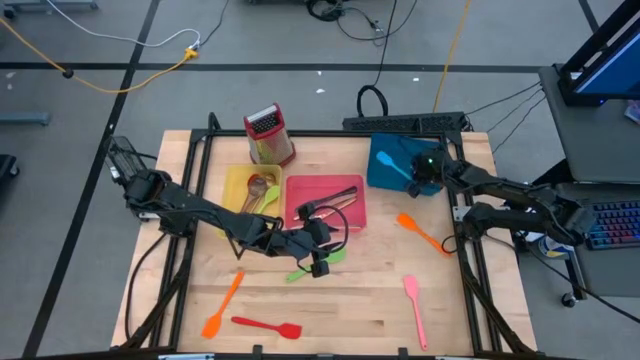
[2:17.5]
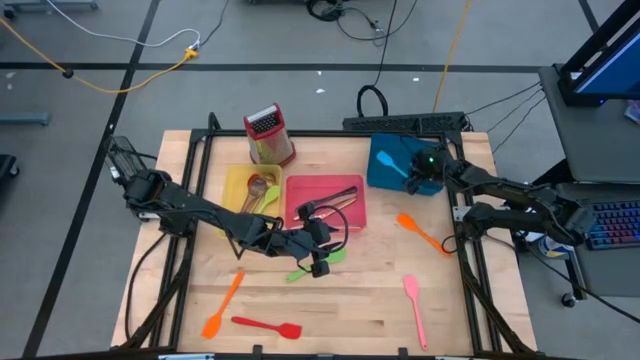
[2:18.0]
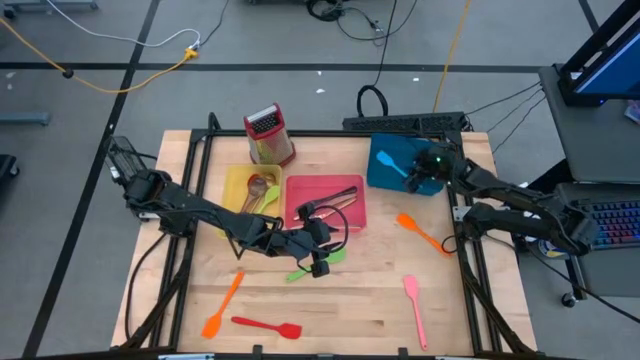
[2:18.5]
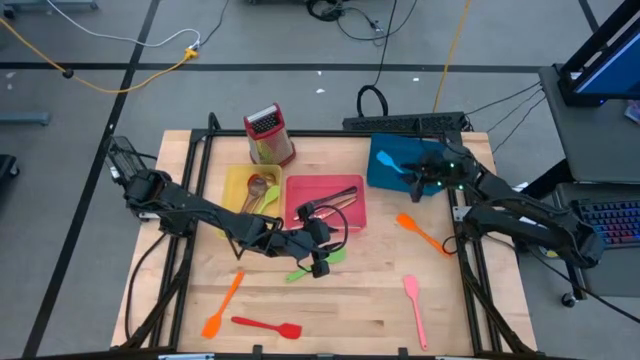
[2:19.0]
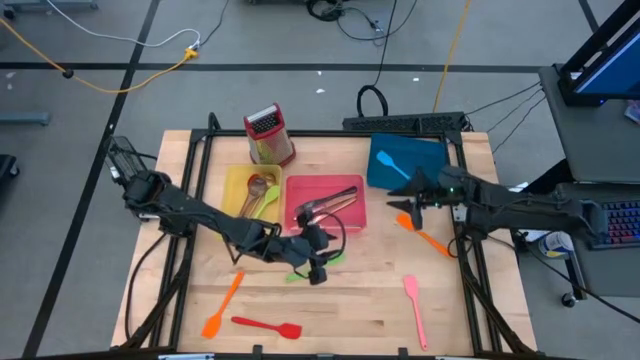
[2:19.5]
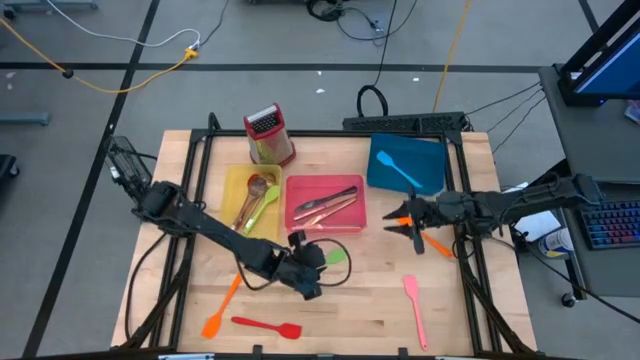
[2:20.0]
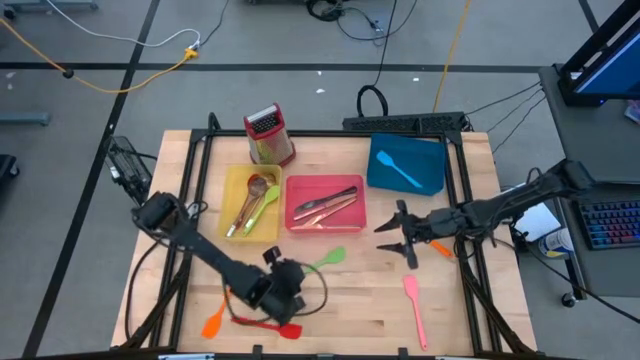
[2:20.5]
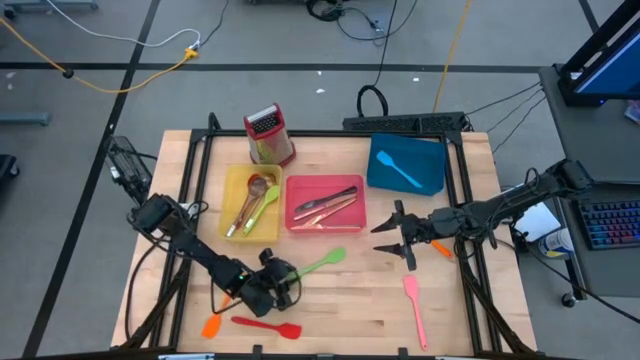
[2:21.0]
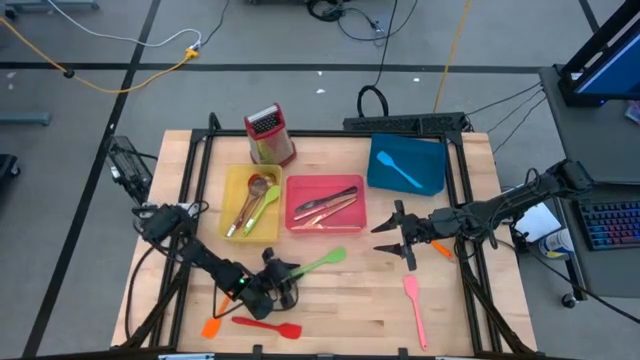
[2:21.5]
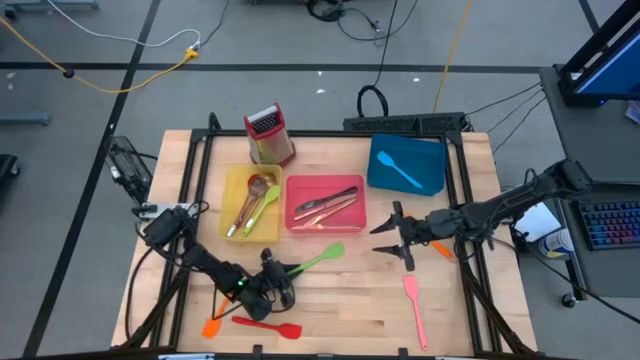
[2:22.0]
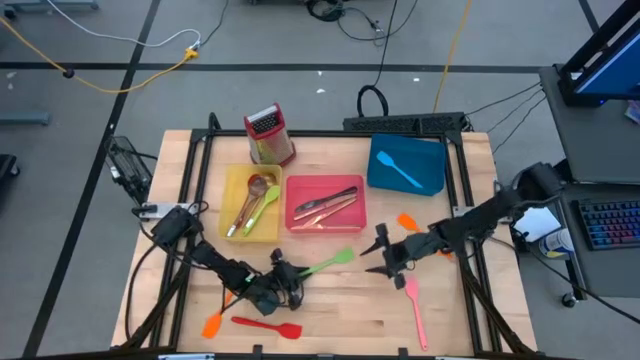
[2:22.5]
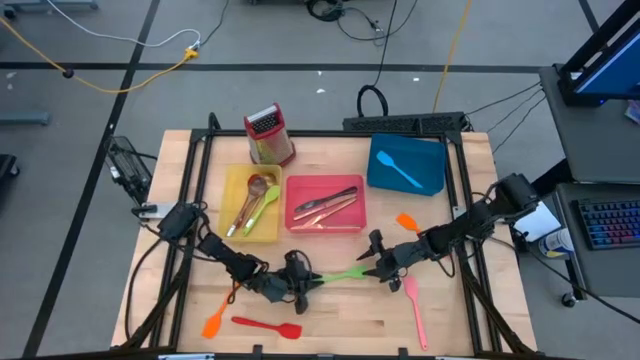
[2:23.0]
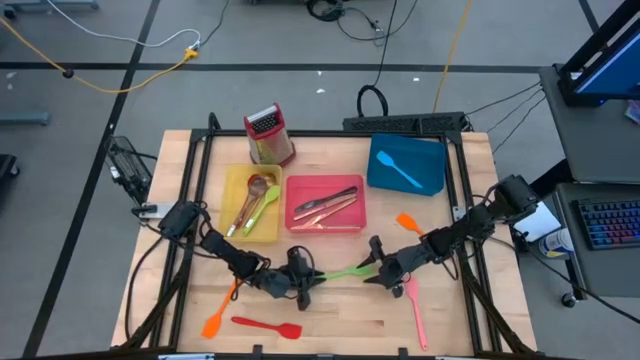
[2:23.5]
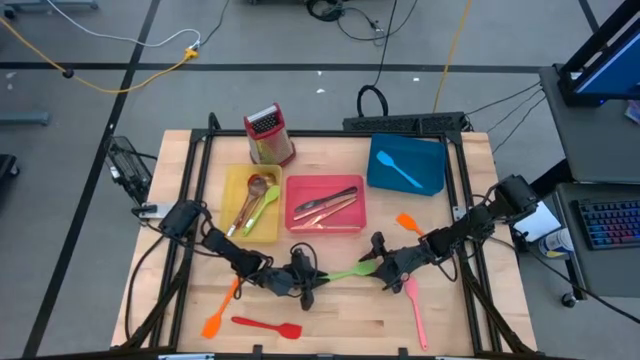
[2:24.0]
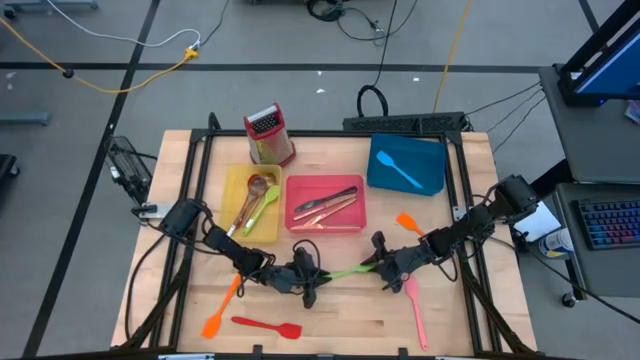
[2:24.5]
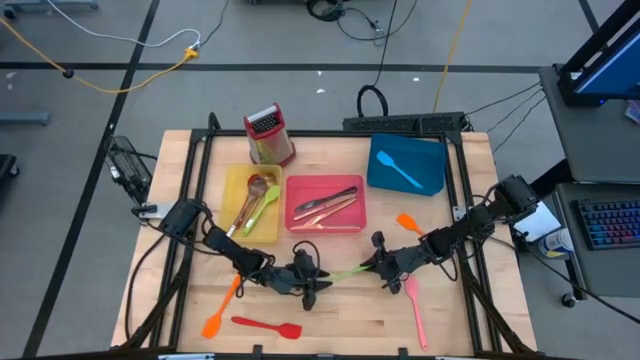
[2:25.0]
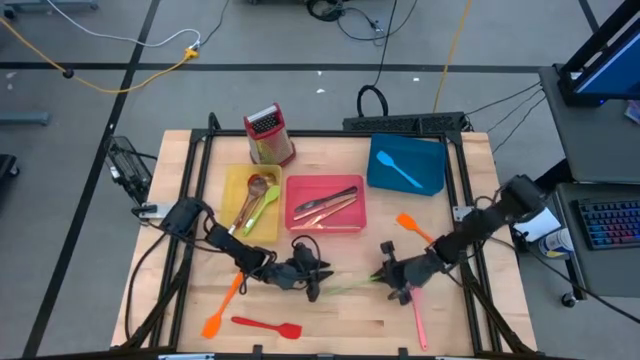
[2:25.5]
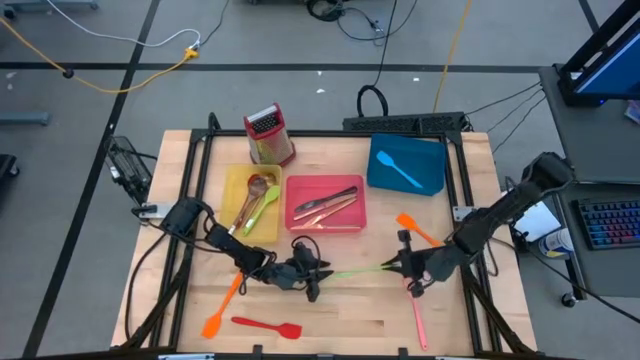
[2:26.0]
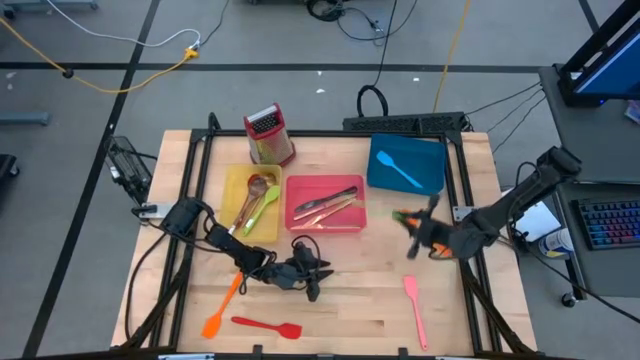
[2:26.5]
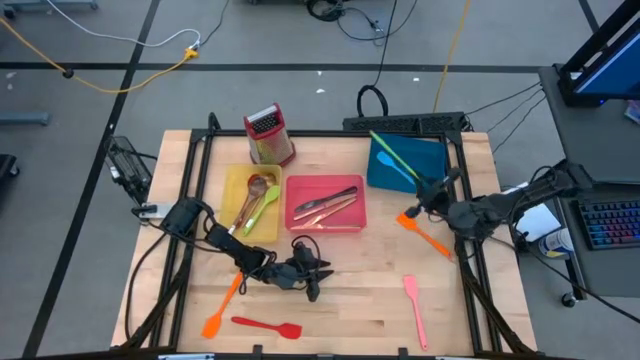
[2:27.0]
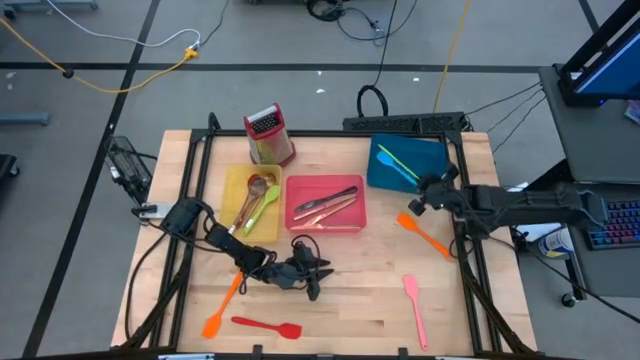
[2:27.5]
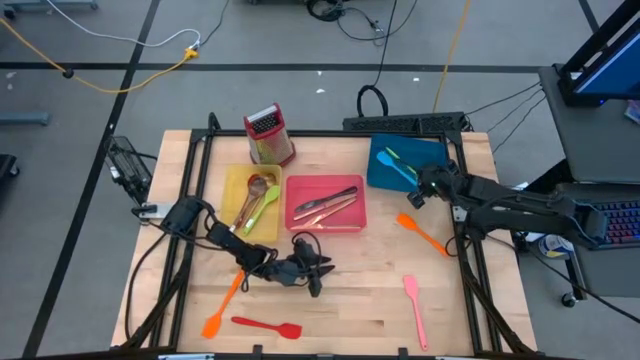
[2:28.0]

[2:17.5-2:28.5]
Task: Pick & Place Kitchen Items
Put the green spatula into the blue bin

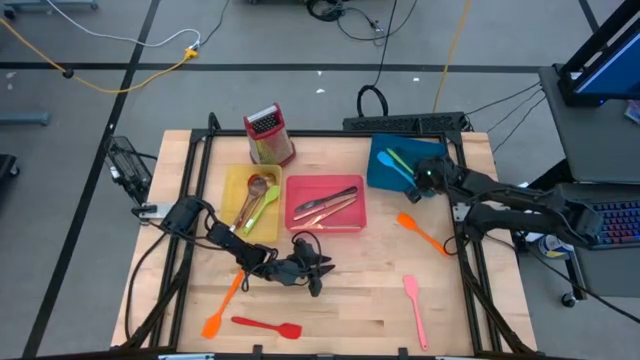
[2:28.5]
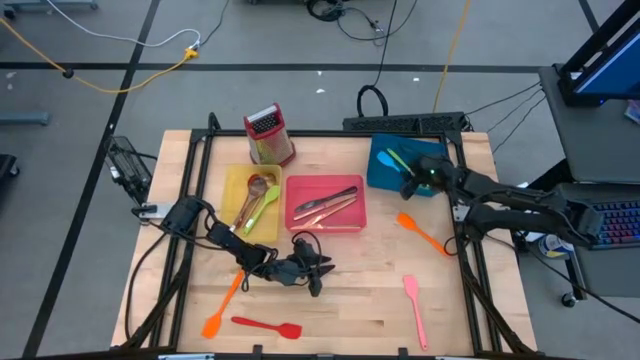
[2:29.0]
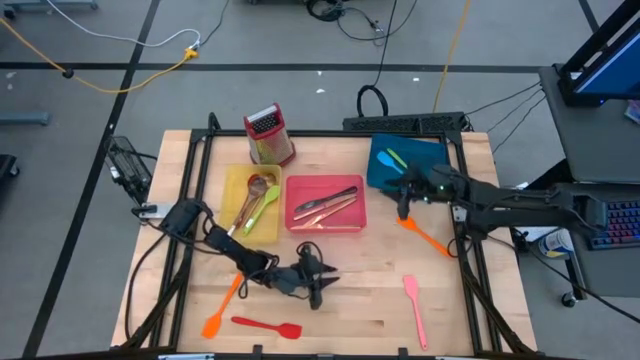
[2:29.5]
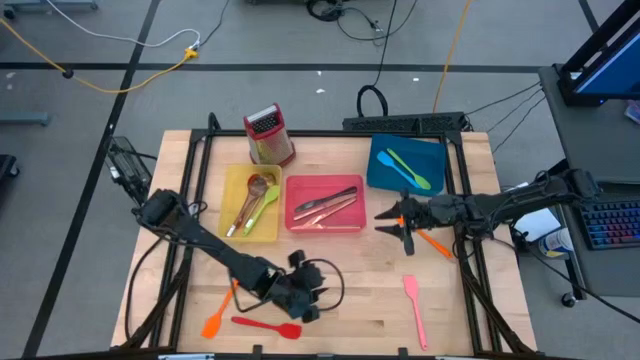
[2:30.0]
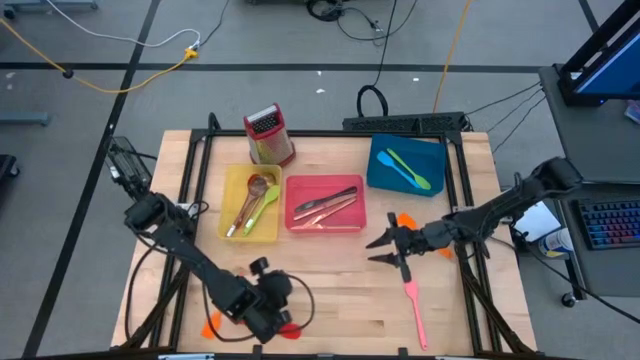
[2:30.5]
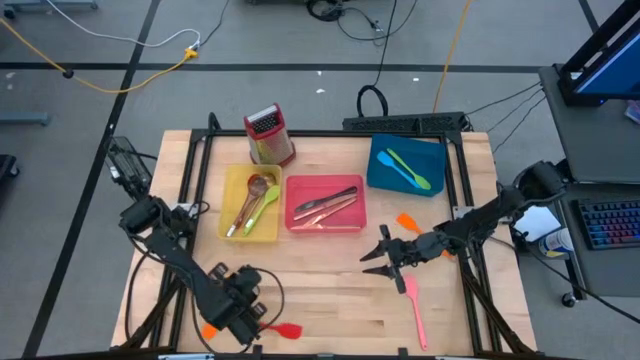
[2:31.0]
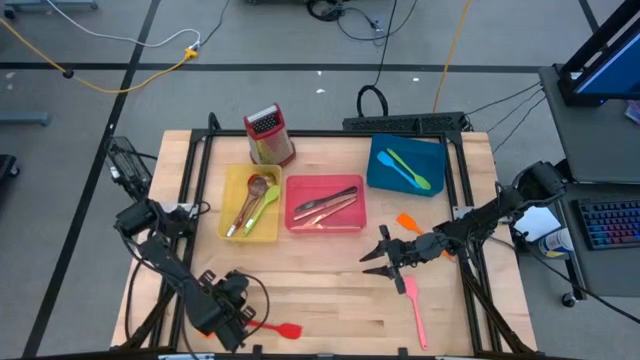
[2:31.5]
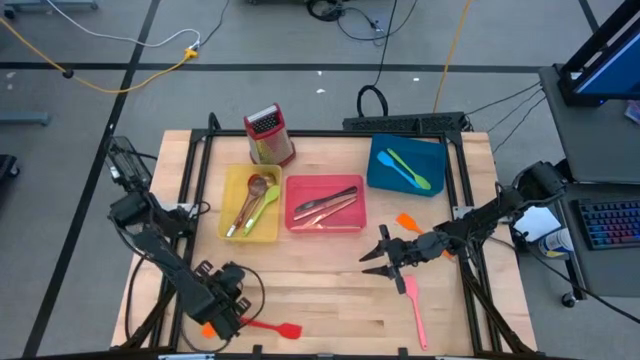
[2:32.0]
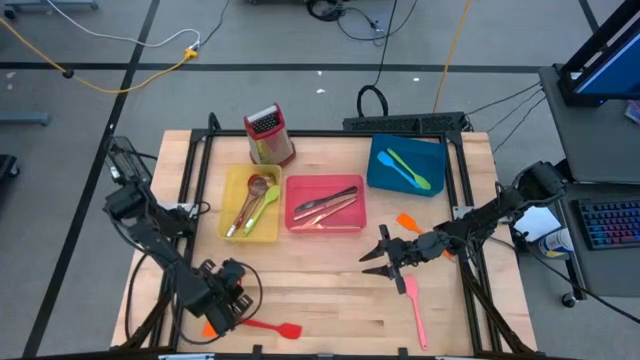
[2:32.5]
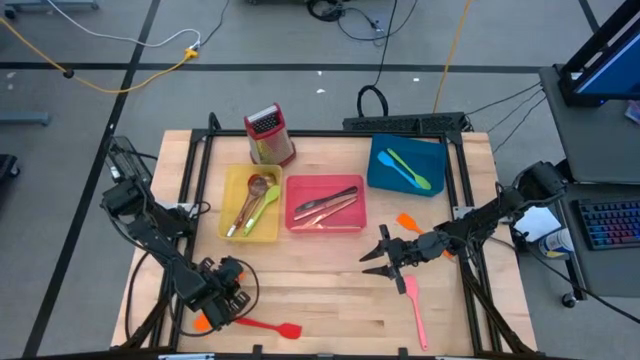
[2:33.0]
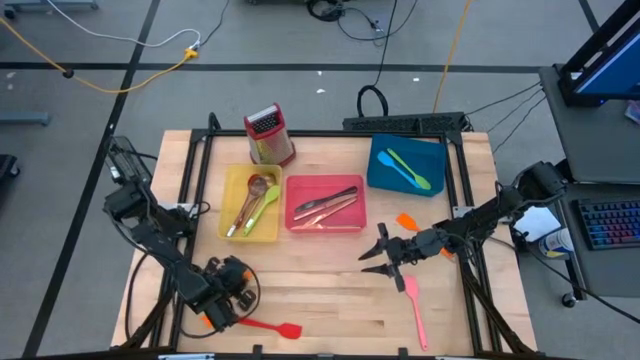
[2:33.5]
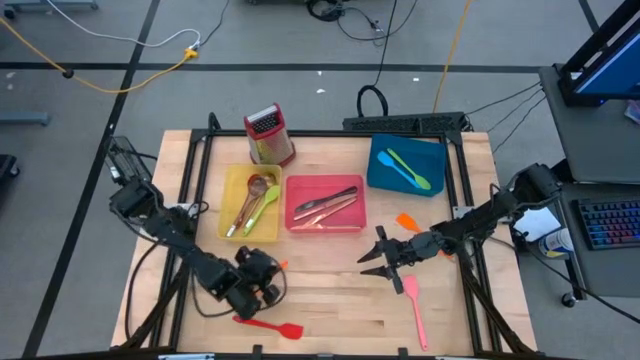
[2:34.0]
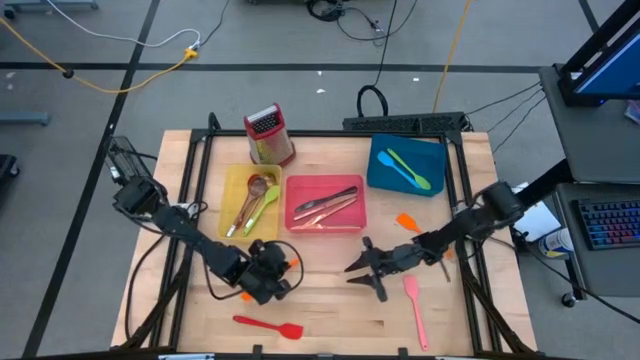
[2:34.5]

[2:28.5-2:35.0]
Put the bottom orange spatula into the blue bin

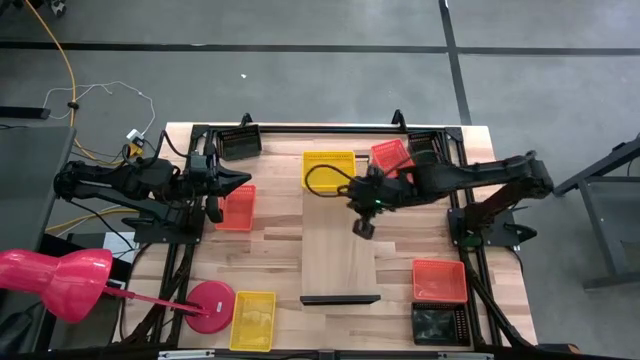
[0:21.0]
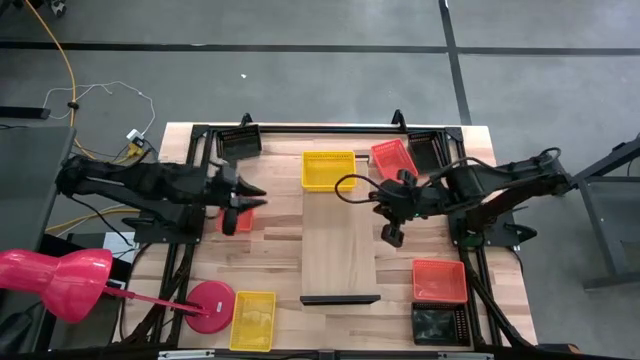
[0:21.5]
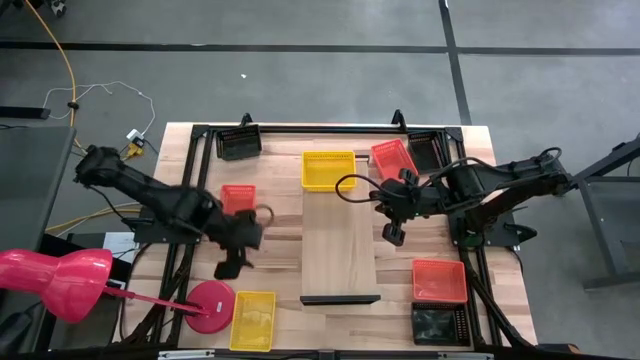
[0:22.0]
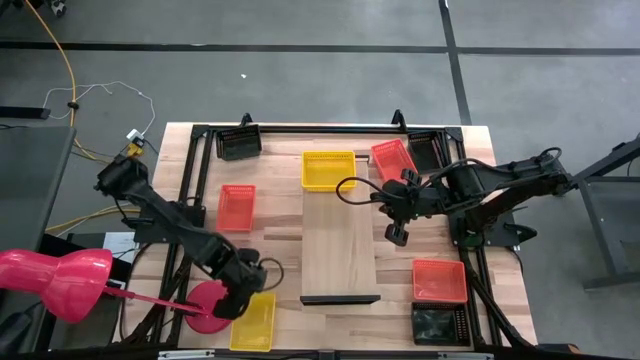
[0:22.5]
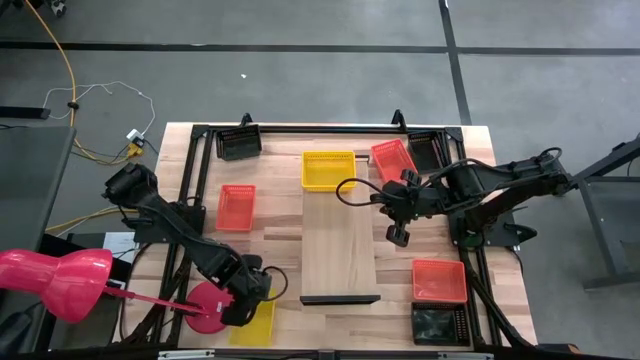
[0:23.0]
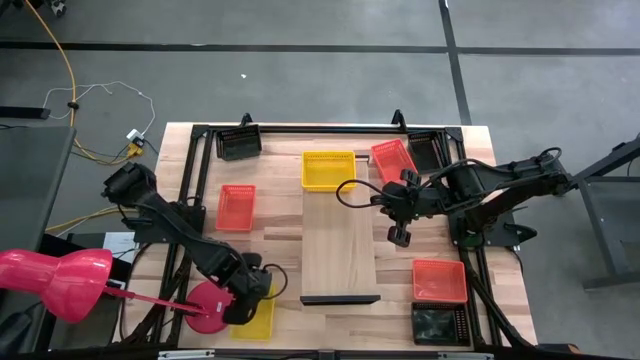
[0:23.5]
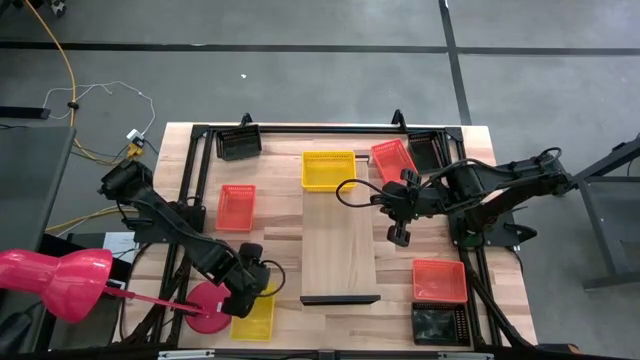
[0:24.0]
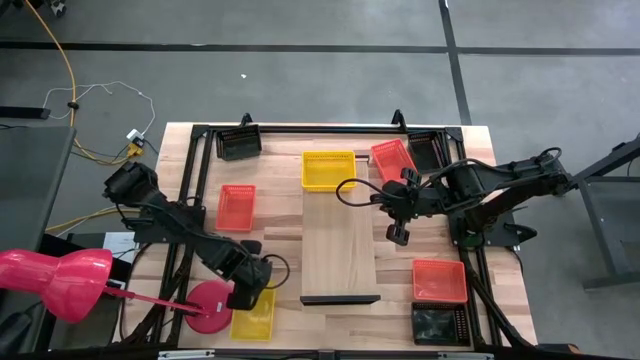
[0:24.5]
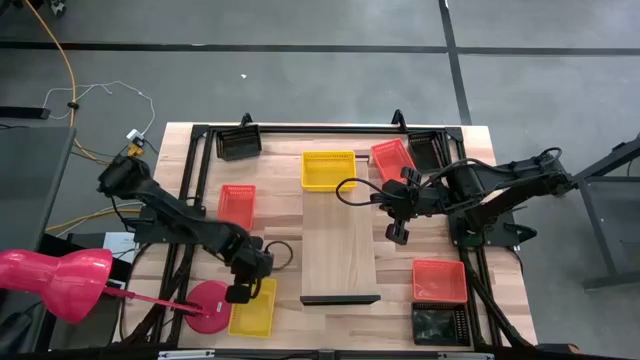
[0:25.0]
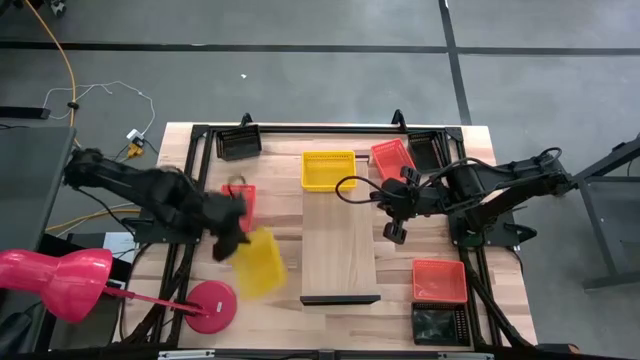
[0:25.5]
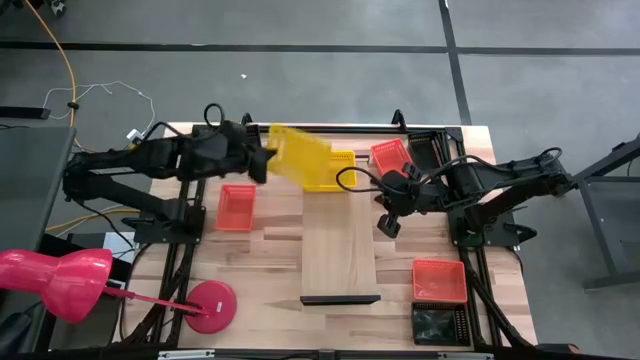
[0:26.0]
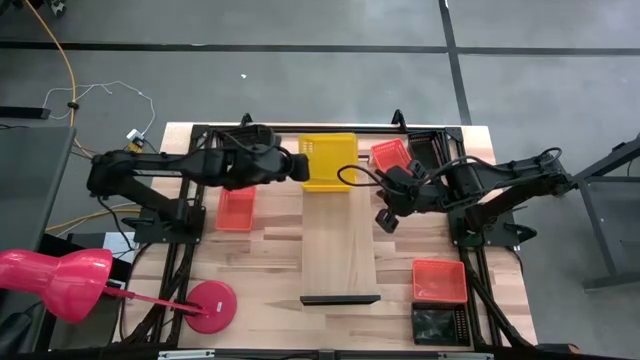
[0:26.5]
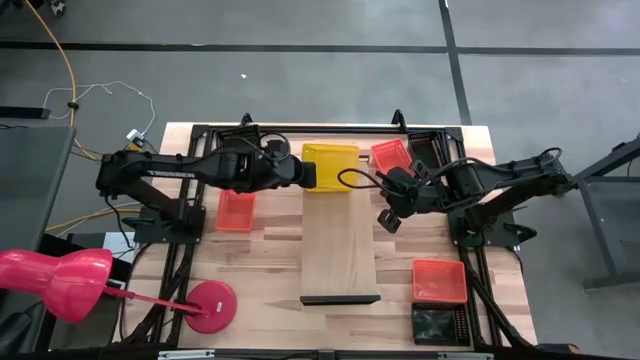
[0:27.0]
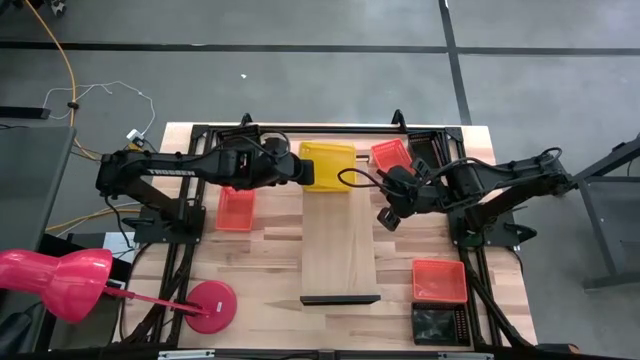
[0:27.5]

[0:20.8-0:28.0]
Task: Stack baskets on shelf by color
Stack the yellow bin on top of the yellow bin on the shelf
